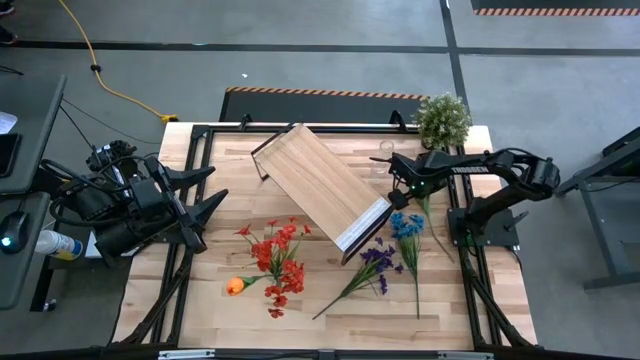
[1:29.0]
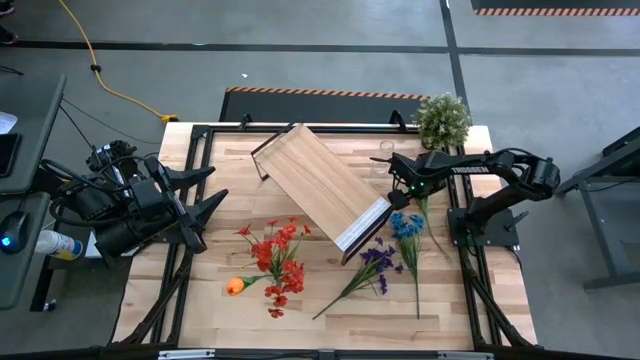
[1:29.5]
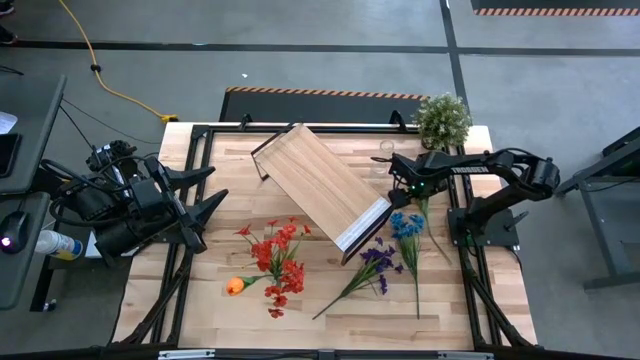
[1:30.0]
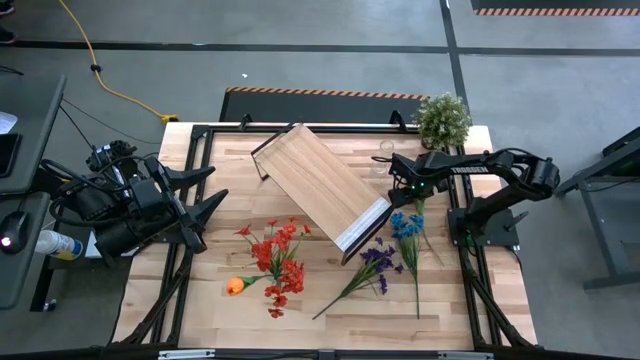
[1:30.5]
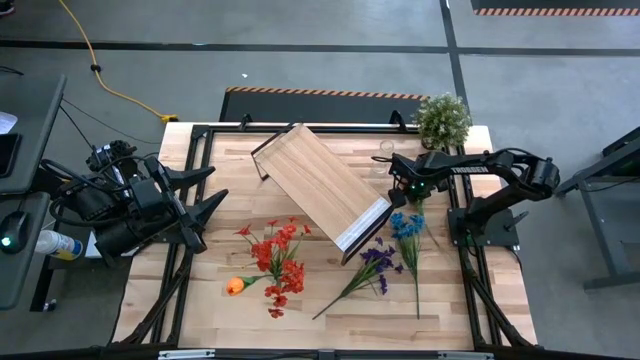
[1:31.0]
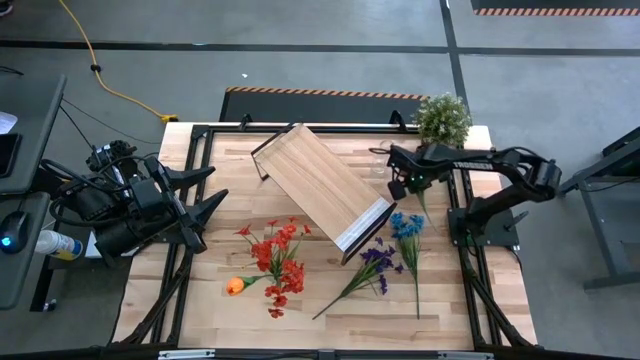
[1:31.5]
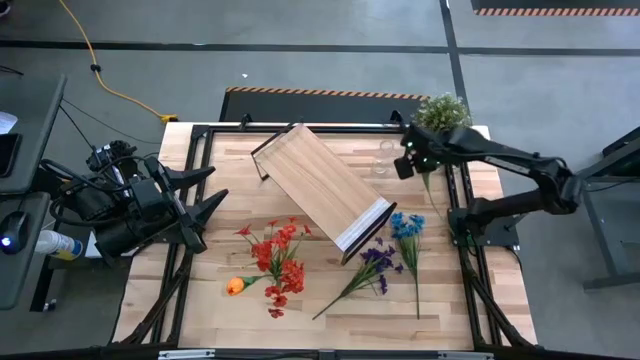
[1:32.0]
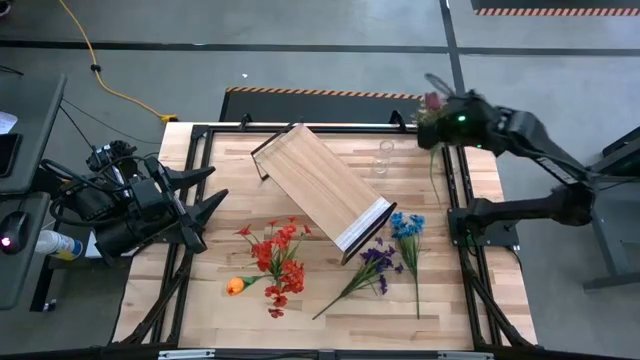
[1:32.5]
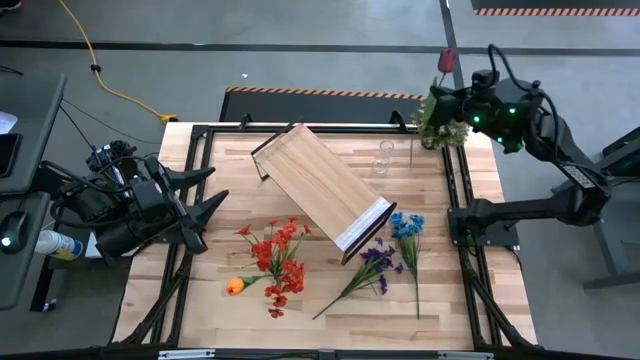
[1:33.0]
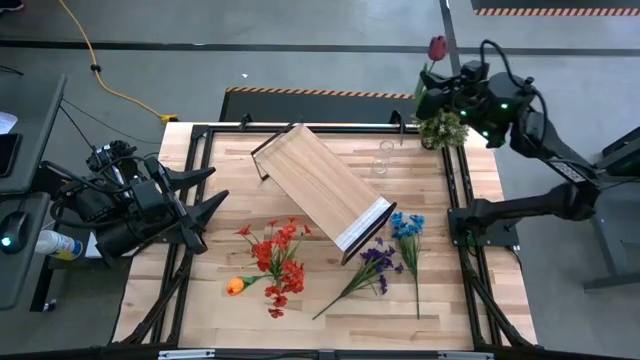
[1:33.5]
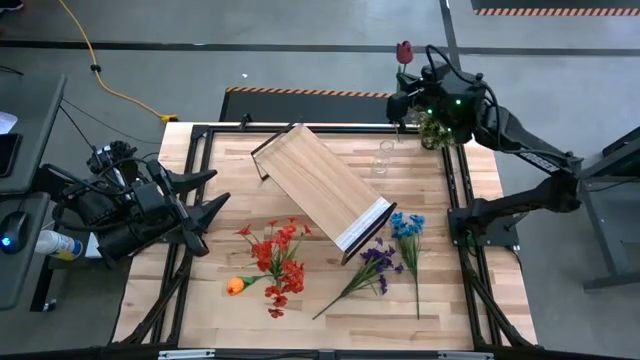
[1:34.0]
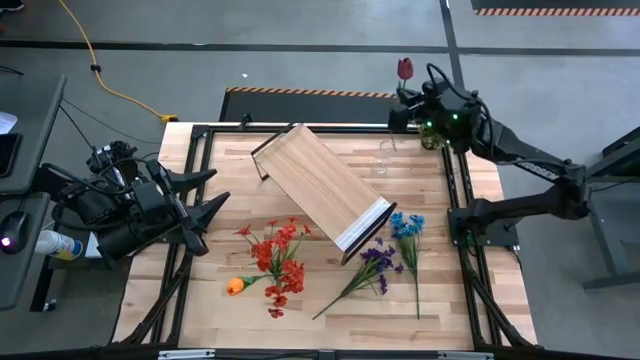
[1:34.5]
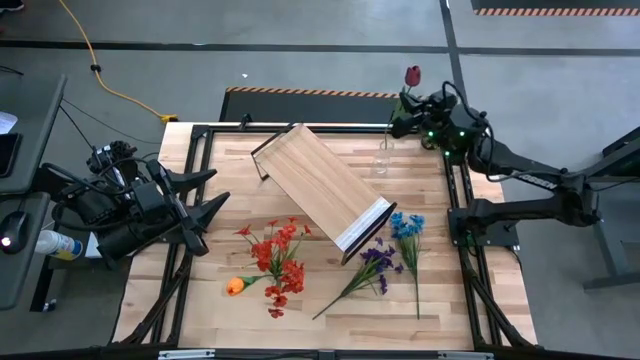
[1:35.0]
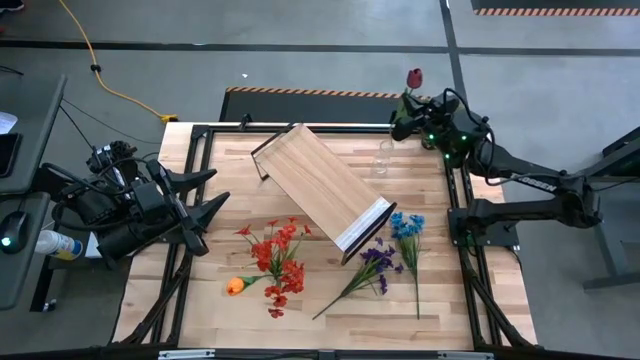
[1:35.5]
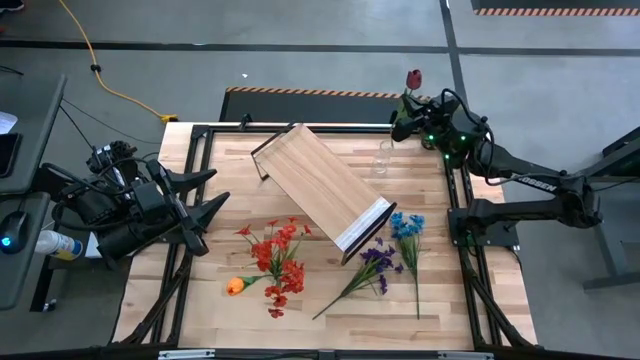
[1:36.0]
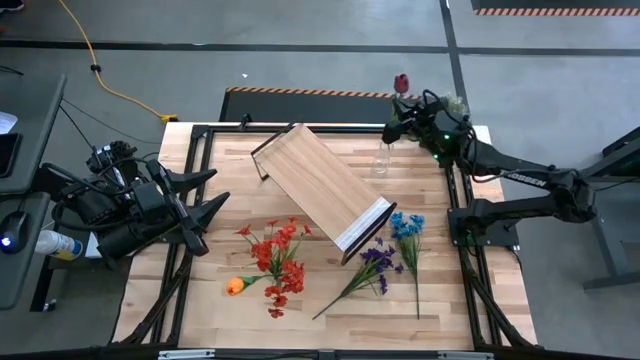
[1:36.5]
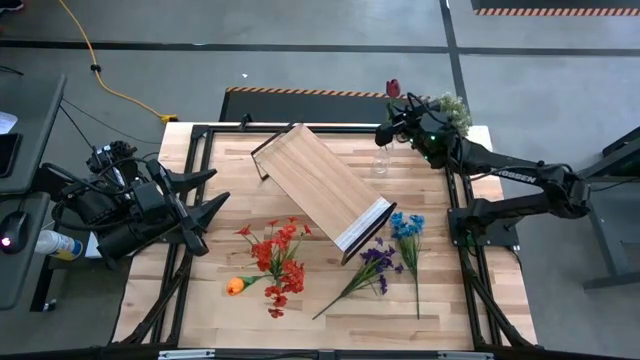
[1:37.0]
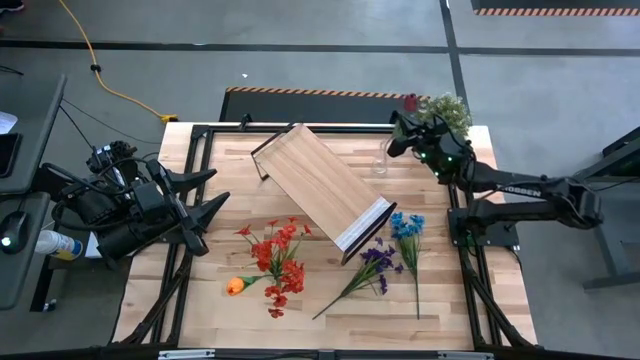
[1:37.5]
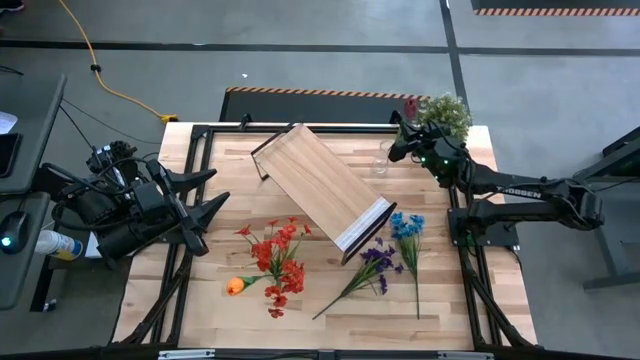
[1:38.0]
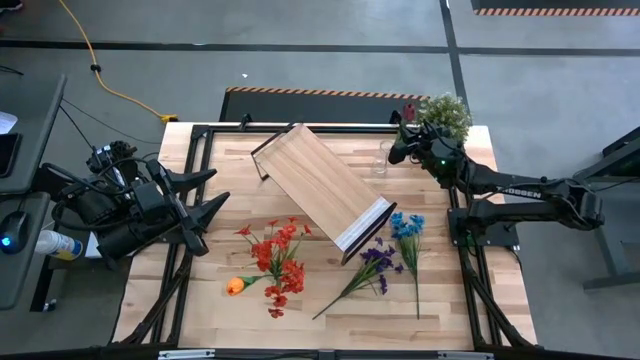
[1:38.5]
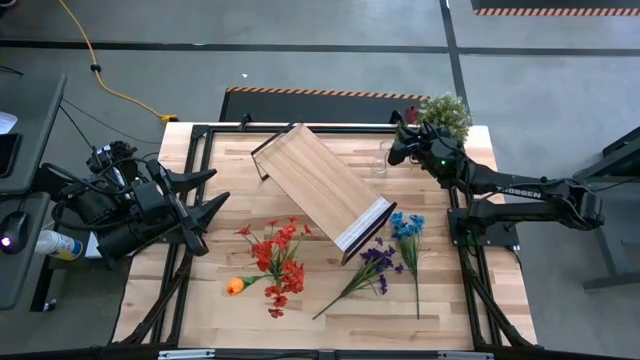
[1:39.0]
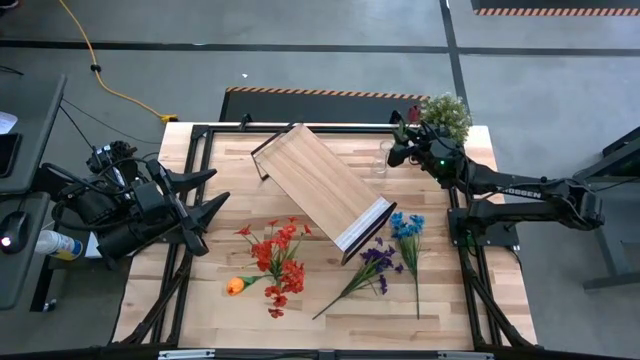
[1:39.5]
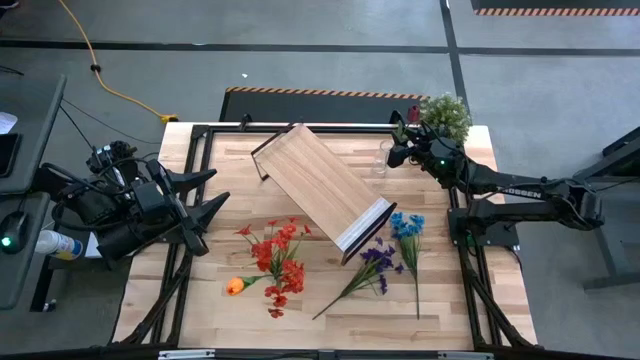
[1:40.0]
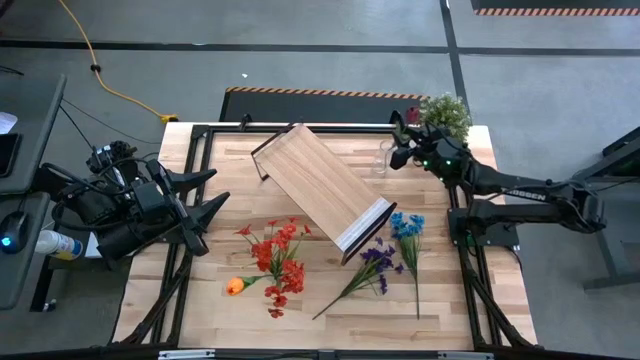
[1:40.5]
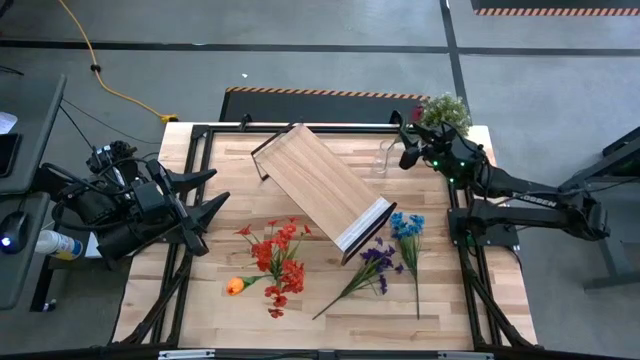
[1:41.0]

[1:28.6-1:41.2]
Task: Pick and place flowers into a vace then onto a shelf
Put the red tulip into the top transparent vase

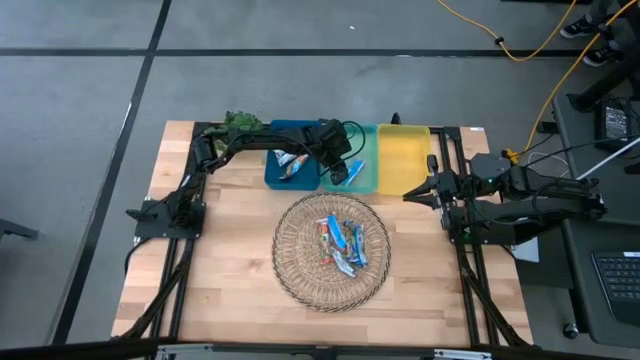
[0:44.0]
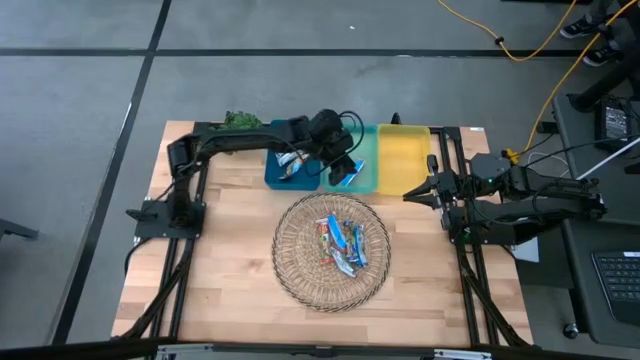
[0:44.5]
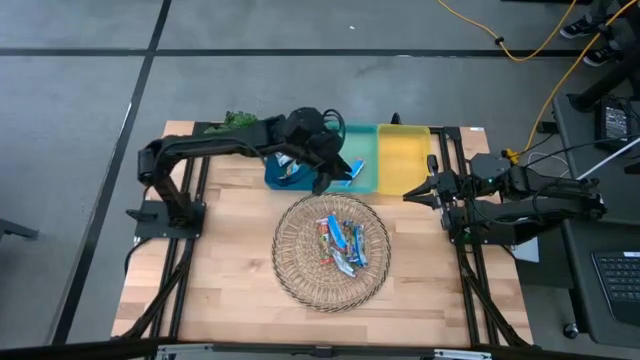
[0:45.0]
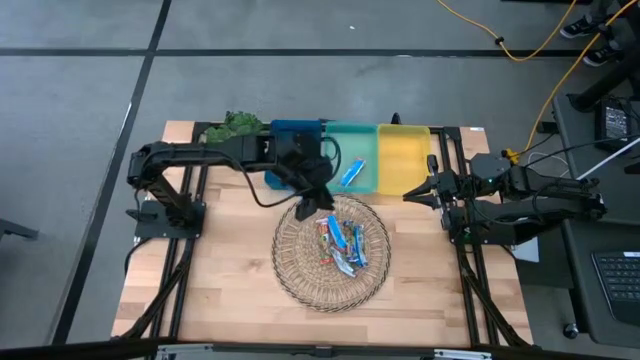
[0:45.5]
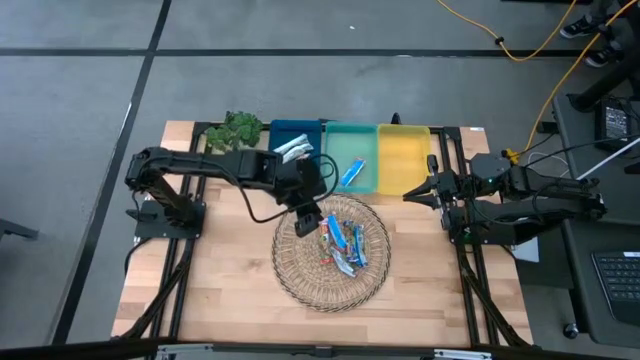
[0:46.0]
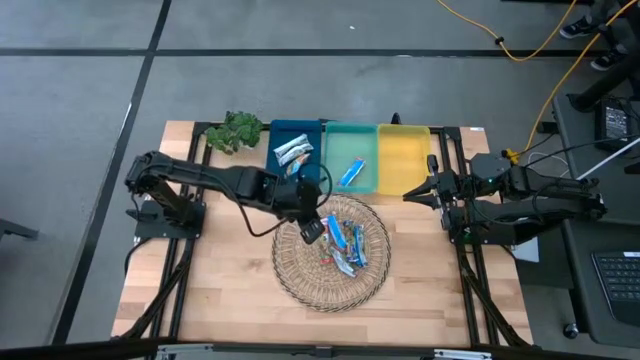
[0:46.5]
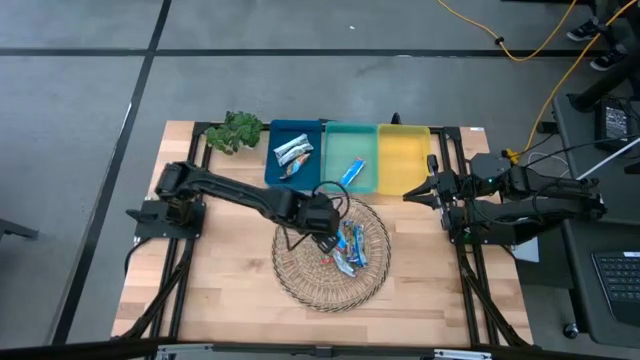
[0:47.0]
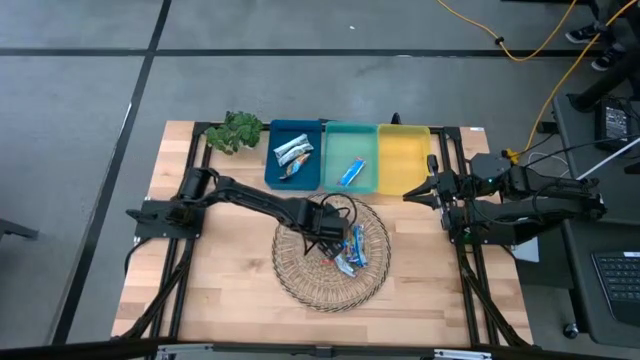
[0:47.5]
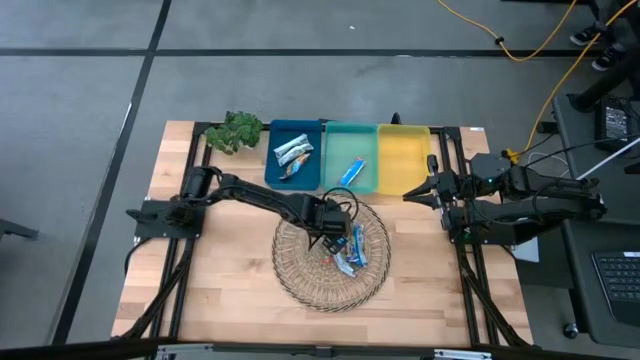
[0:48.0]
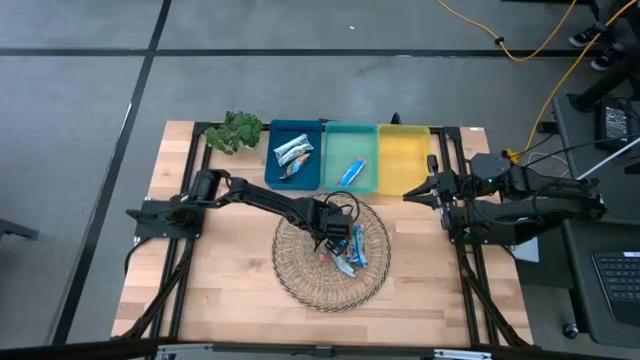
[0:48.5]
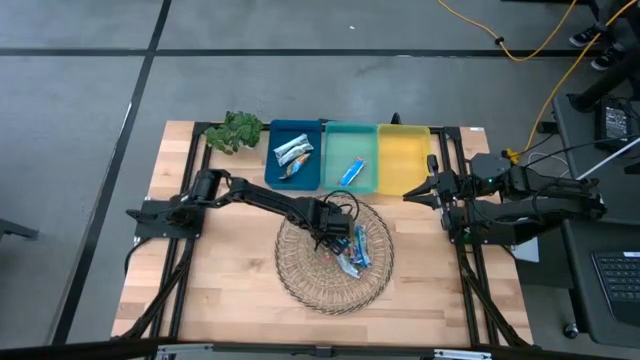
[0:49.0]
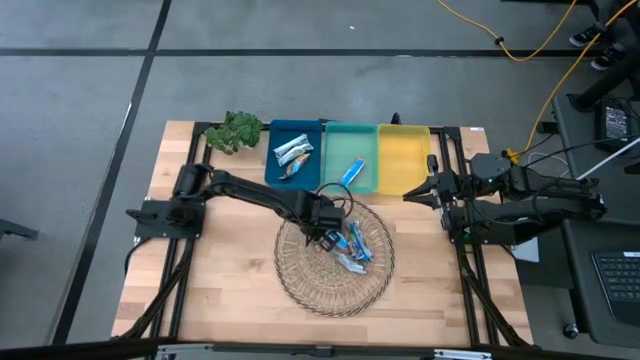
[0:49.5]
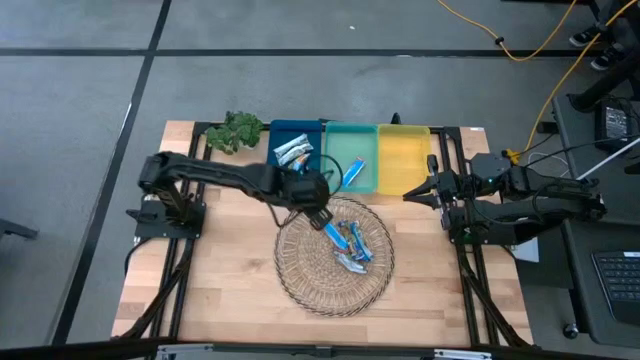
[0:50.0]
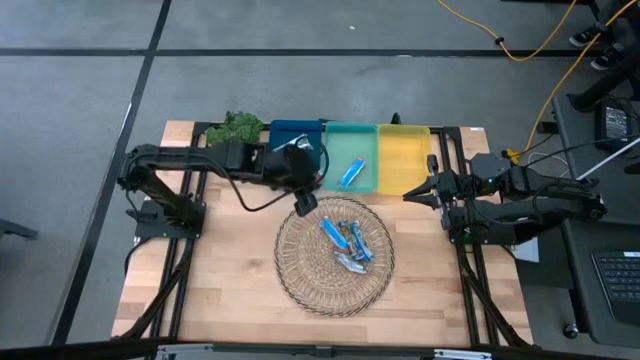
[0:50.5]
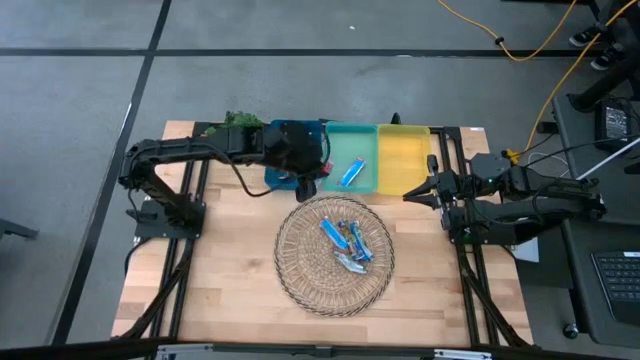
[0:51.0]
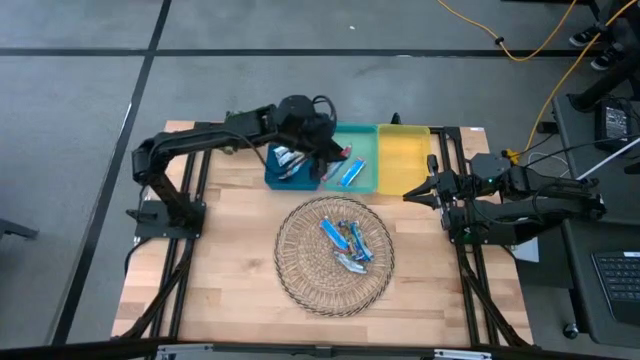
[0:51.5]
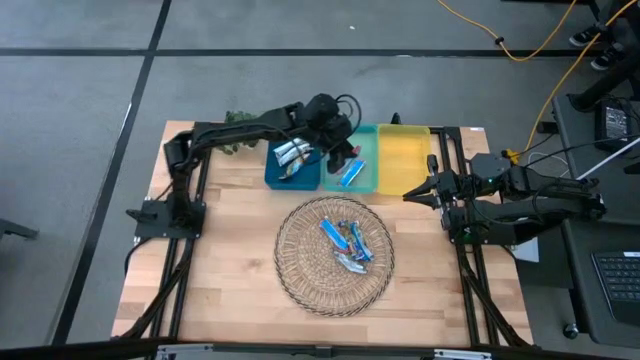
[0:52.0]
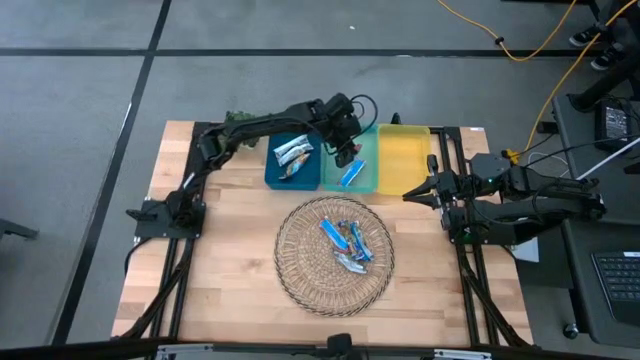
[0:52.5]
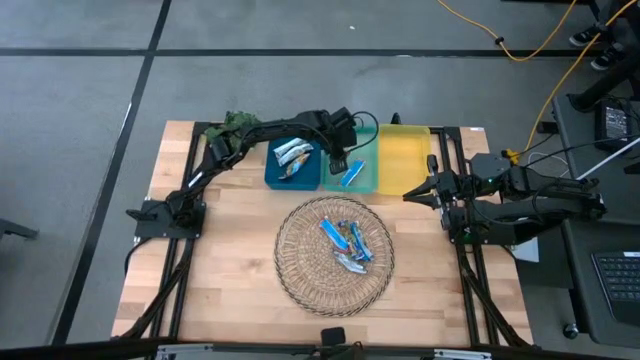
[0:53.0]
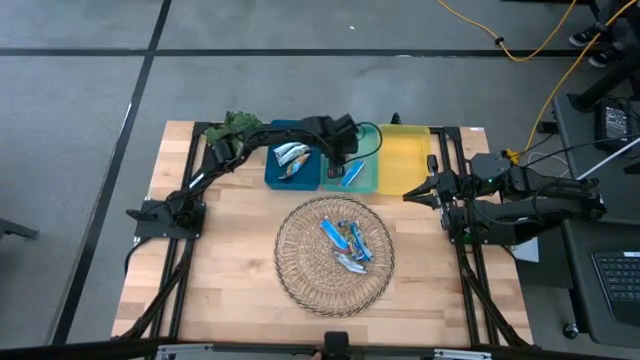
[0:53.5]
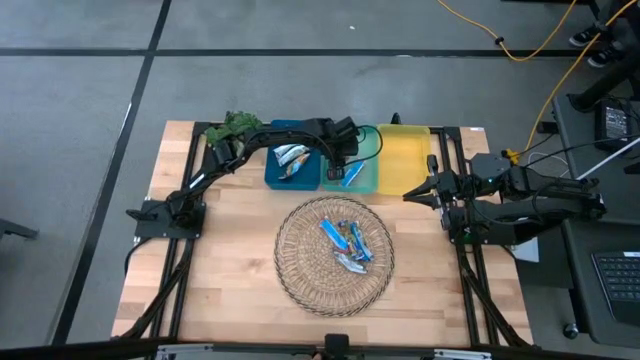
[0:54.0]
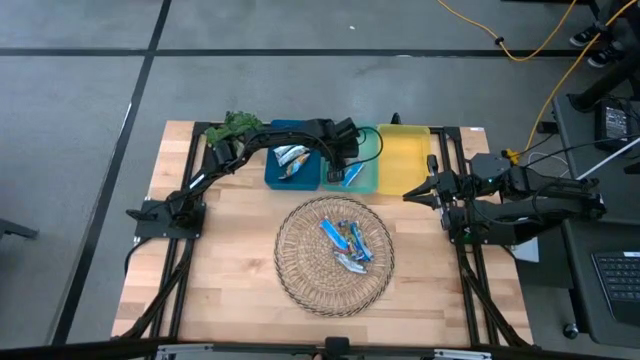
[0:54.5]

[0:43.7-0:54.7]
Task: Pick and place Granola Bars by type
Put the orange granola bar into the green bin
